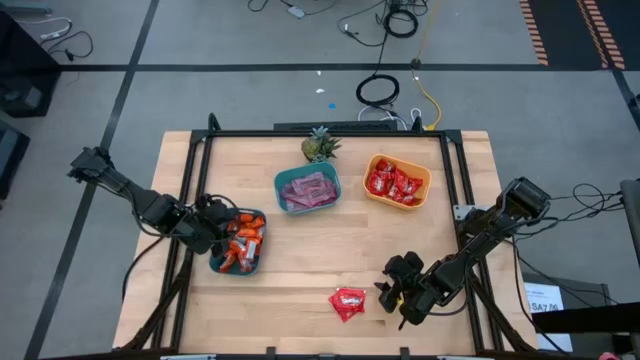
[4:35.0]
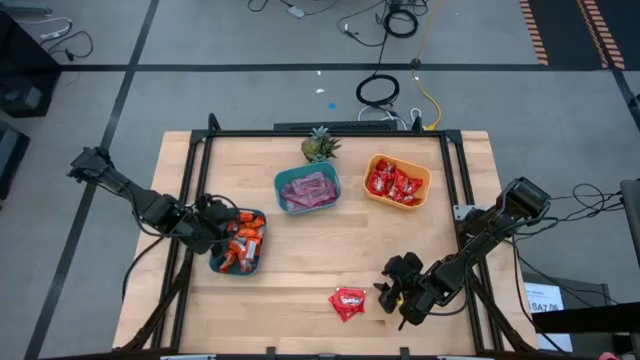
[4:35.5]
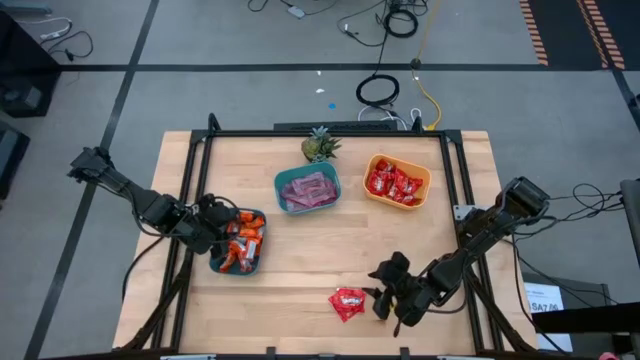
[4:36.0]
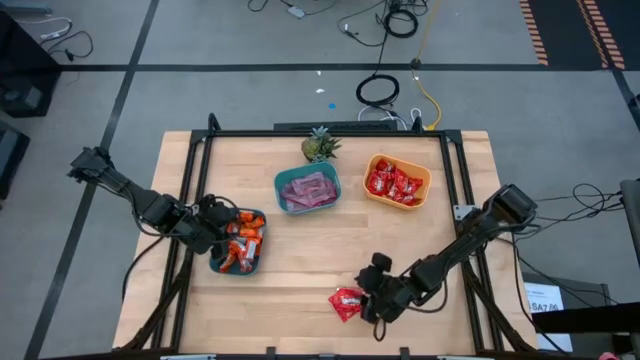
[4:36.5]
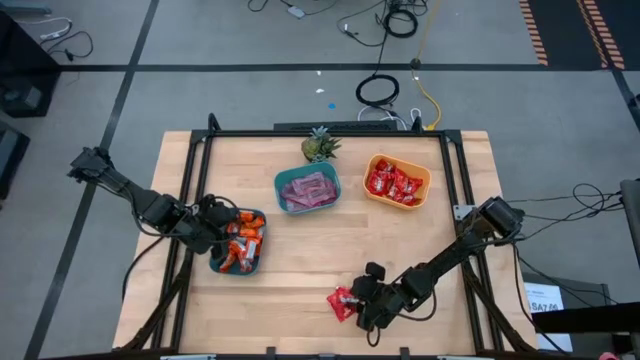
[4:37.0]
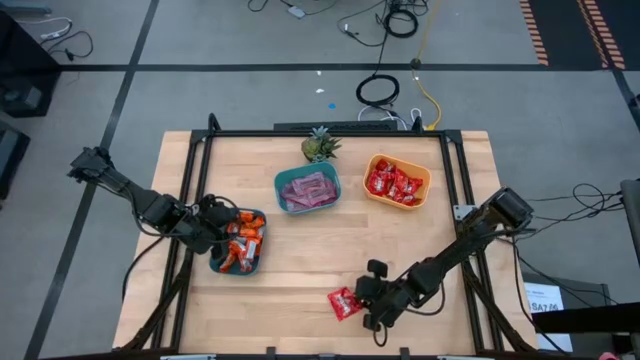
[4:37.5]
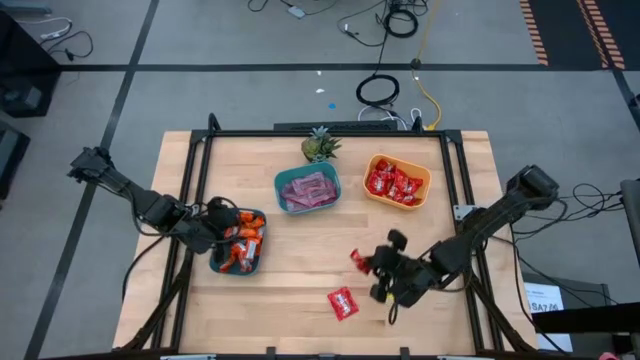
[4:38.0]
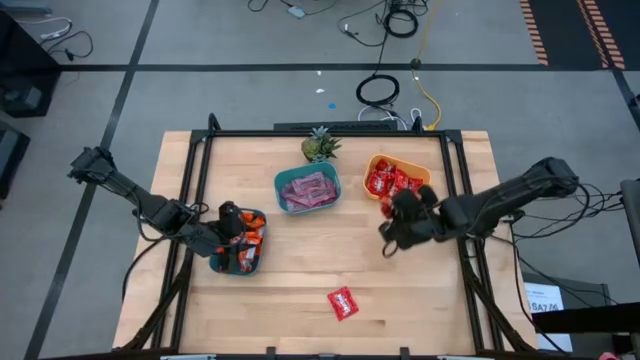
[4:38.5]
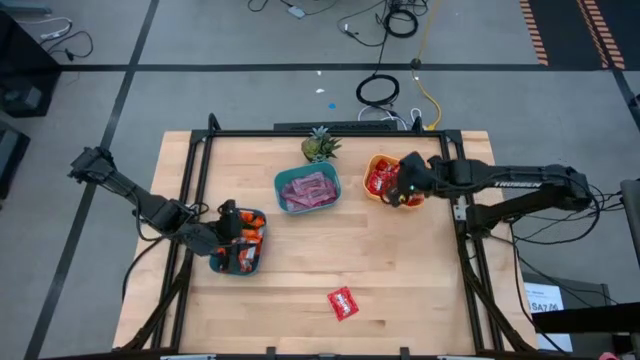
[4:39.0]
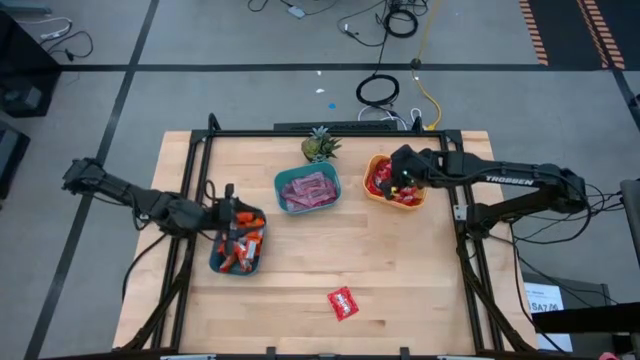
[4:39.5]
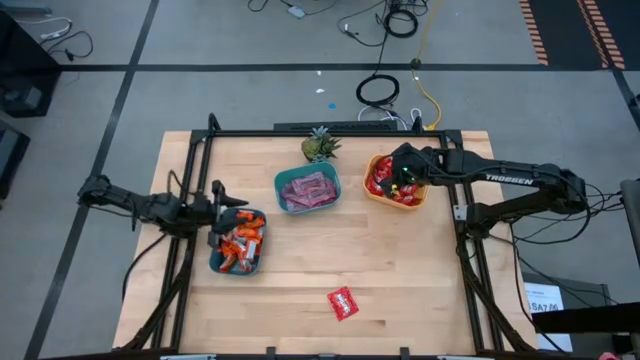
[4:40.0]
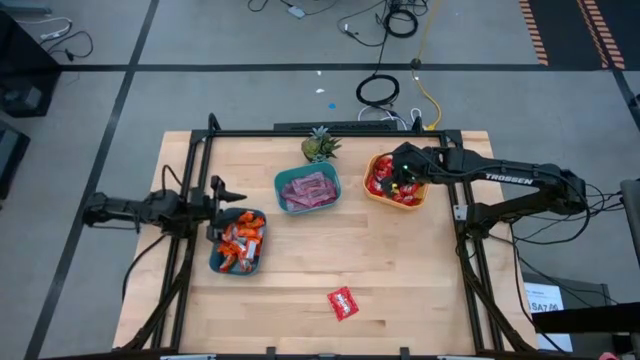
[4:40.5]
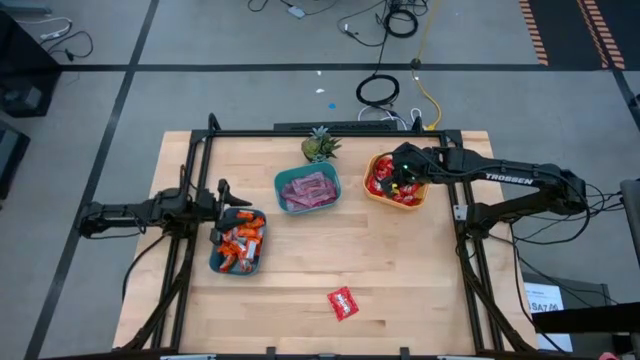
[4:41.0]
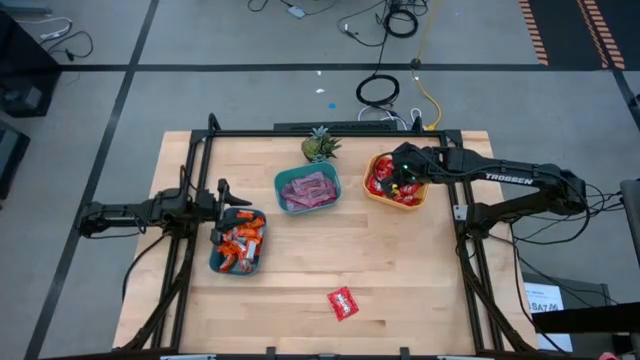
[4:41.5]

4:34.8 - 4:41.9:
Task: Sort candy
Put the red candy into the yellow bin

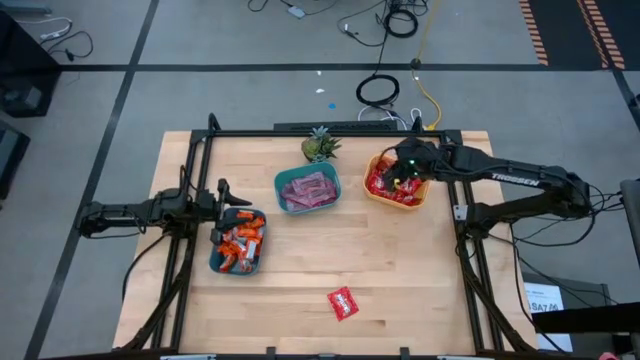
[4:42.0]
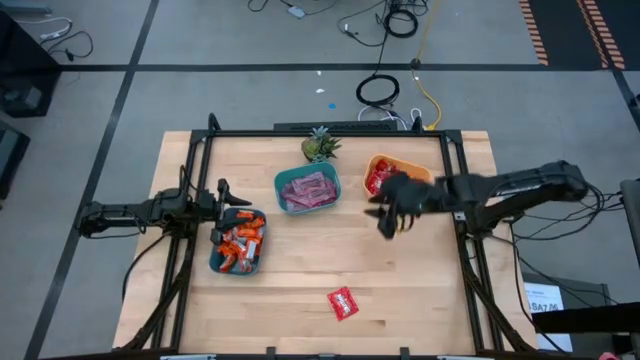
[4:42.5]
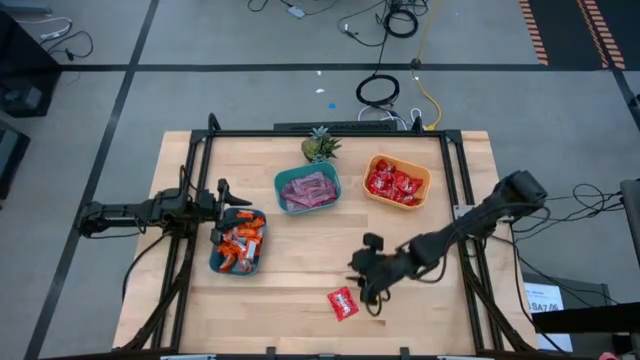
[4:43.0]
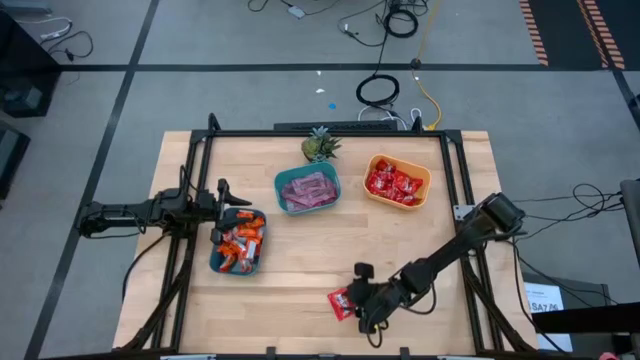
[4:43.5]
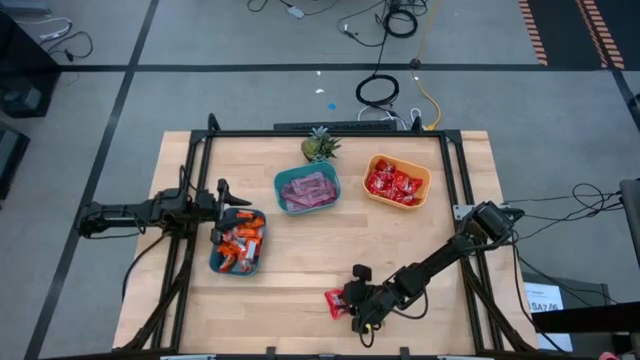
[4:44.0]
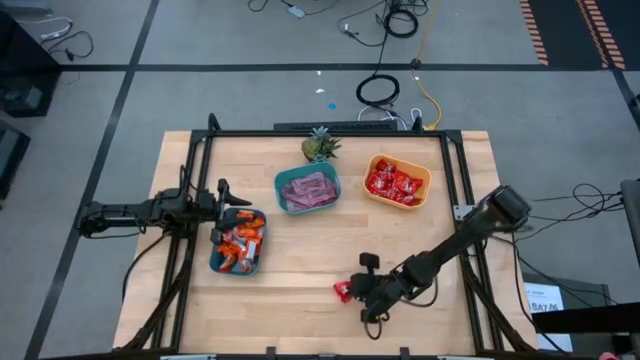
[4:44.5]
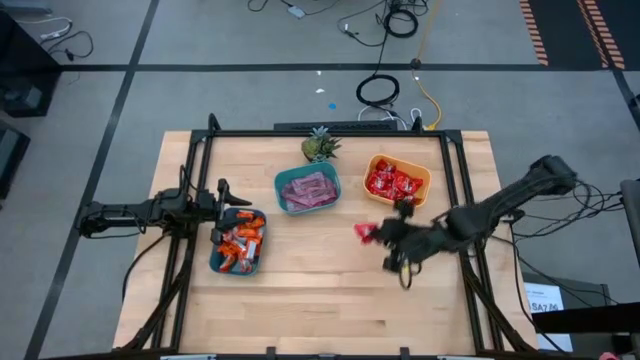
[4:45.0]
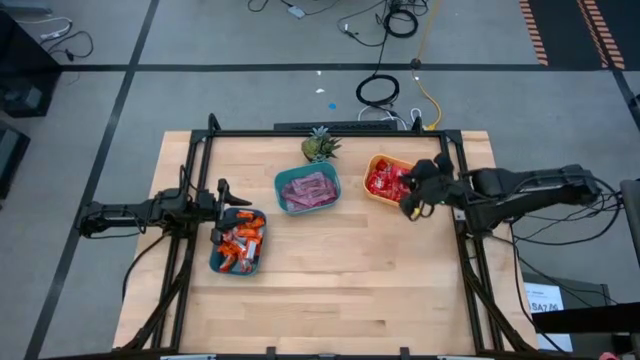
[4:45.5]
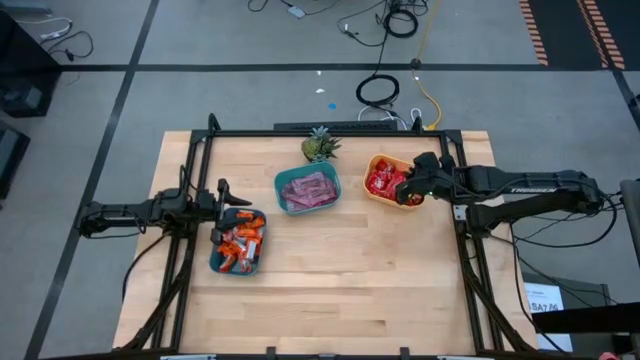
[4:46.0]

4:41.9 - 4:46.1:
Put the red candy into the yellow bin

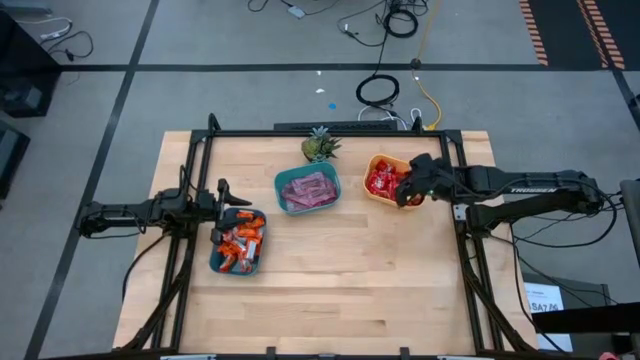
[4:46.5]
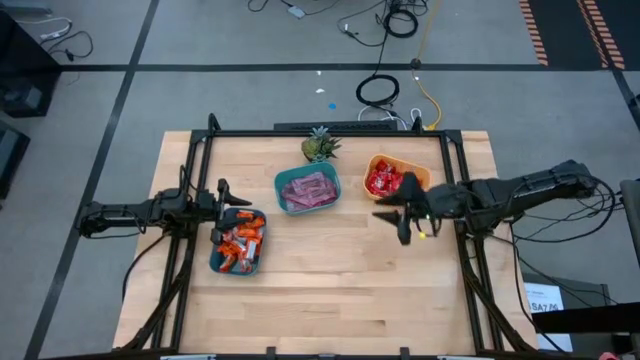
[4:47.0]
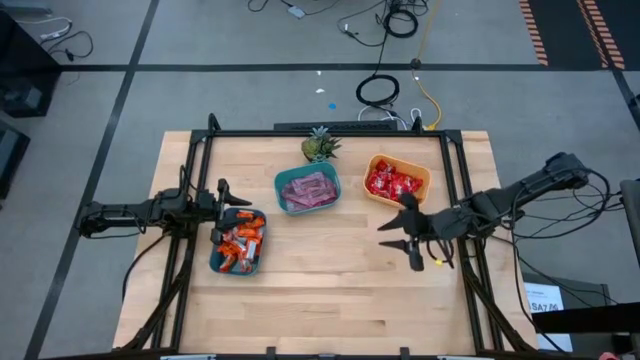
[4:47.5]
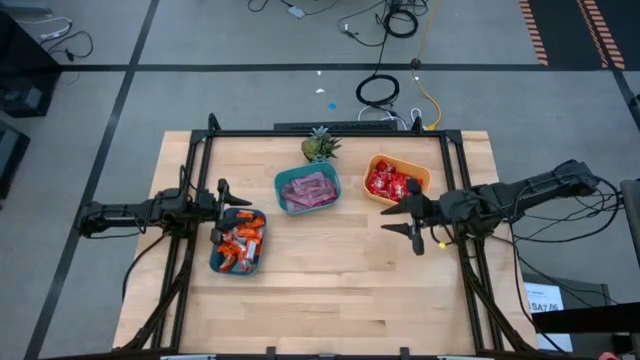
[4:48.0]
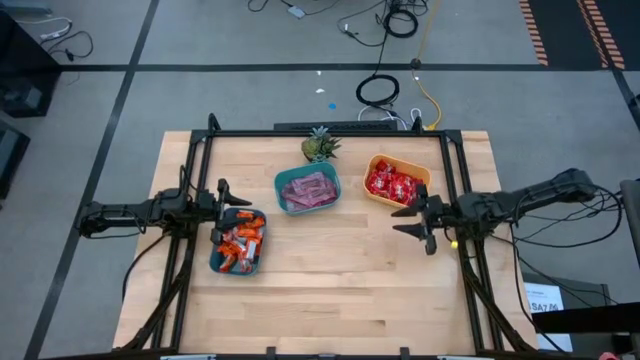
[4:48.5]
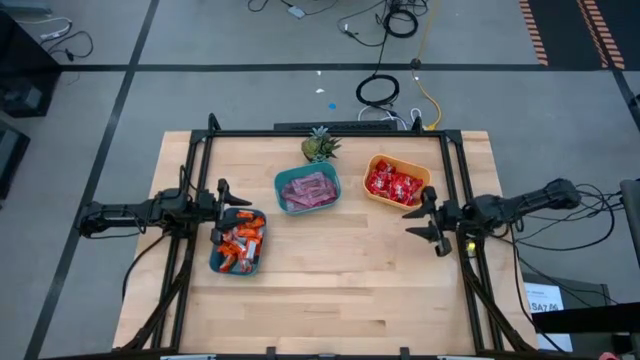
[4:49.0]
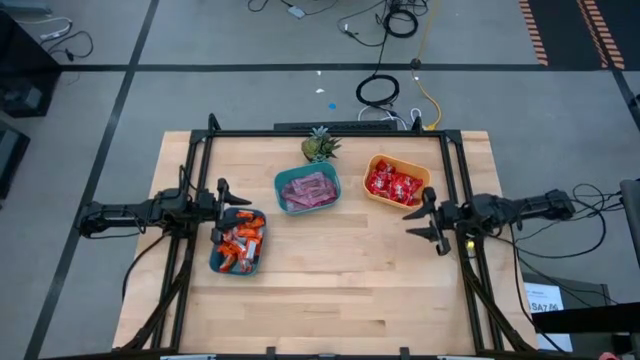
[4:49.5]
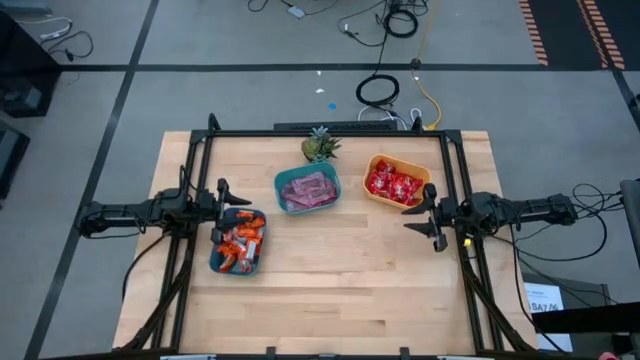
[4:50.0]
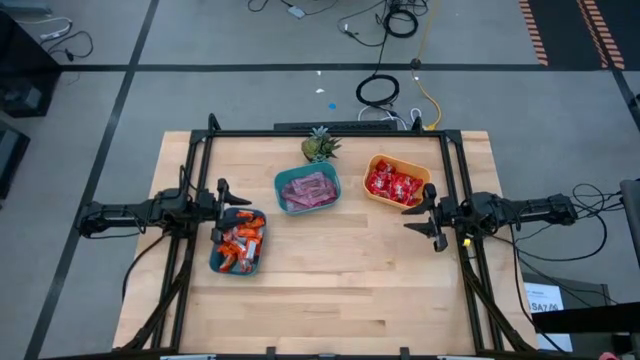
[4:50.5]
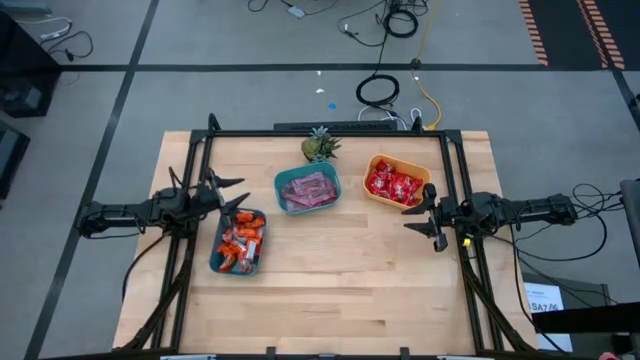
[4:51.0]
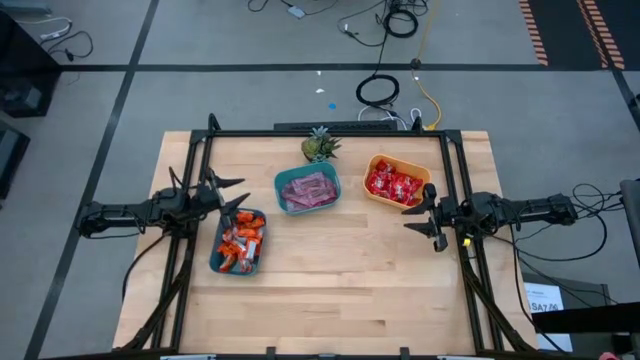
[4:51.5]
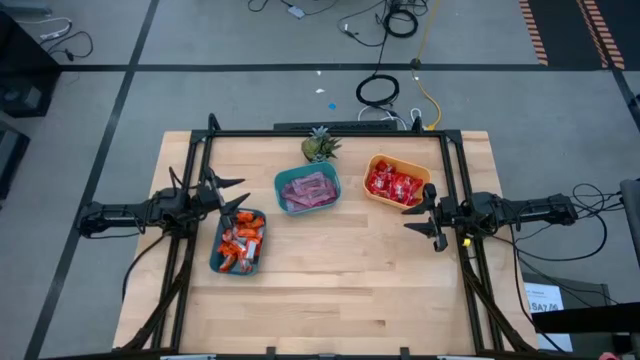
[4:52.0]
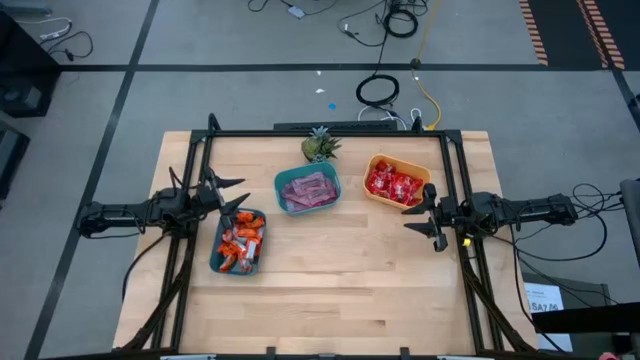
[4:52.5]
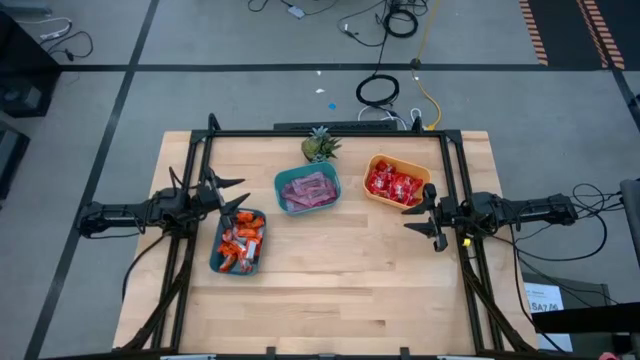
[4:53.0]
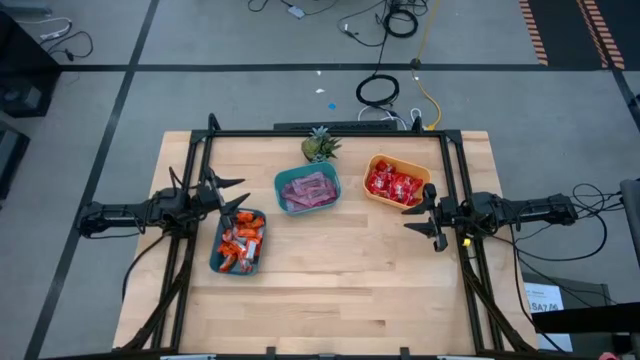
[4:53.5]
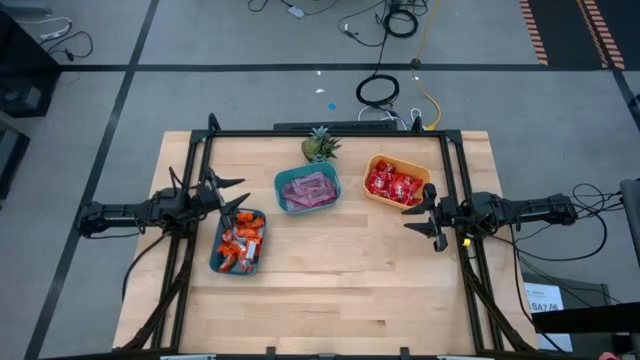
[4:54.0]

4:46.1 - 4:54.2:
Return to Home Position

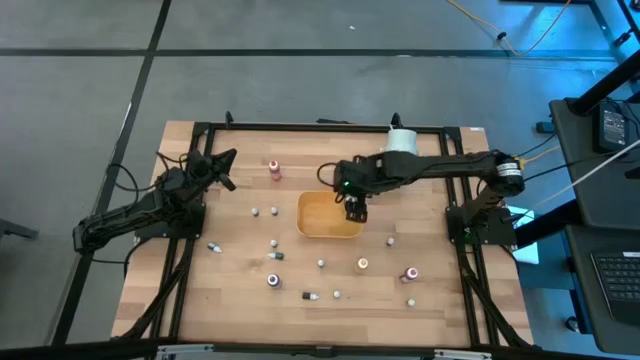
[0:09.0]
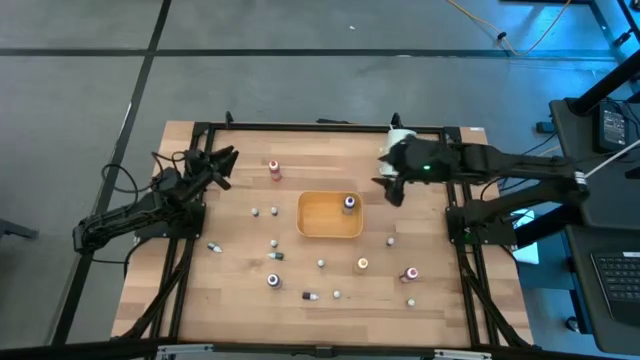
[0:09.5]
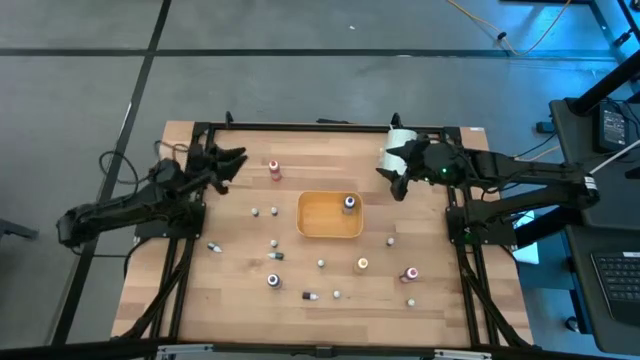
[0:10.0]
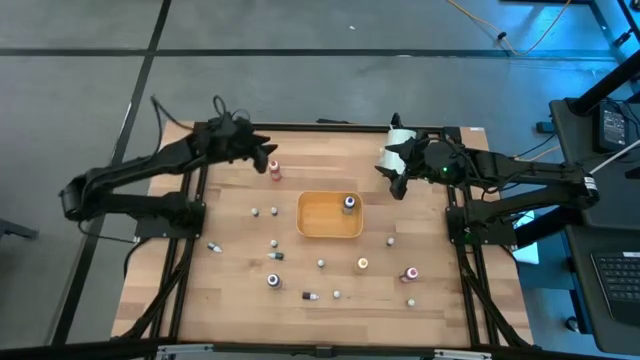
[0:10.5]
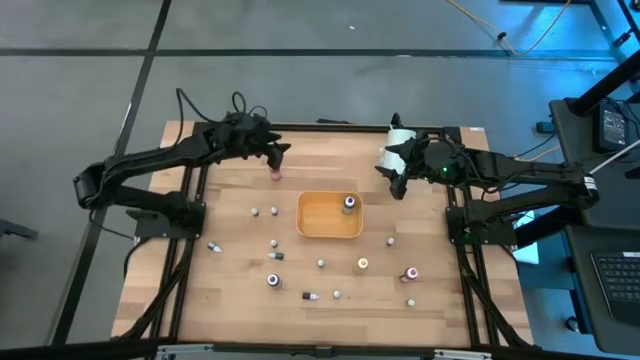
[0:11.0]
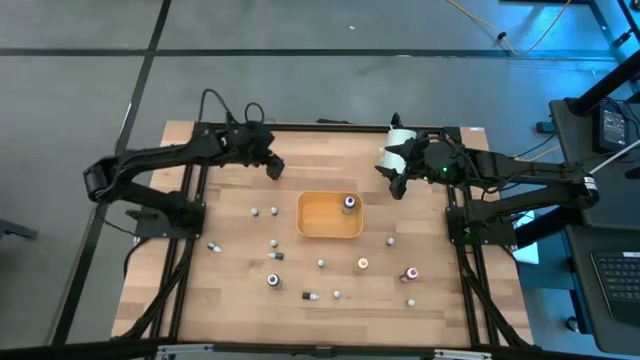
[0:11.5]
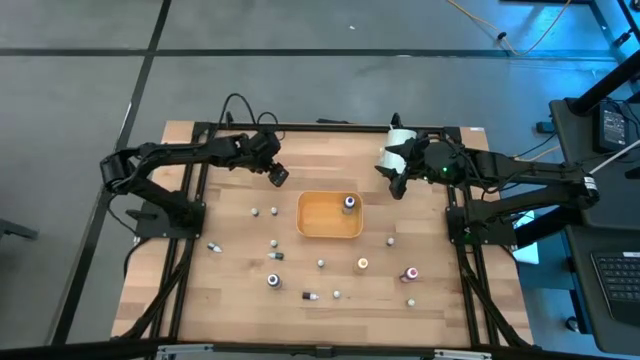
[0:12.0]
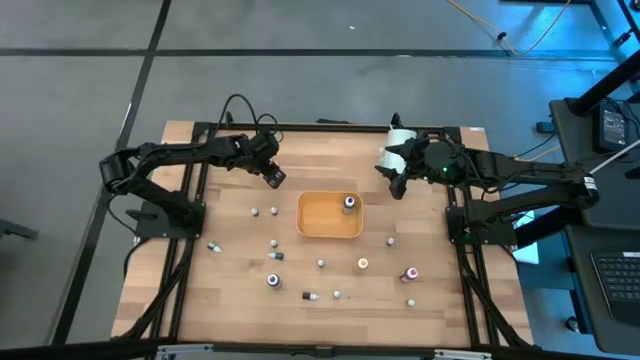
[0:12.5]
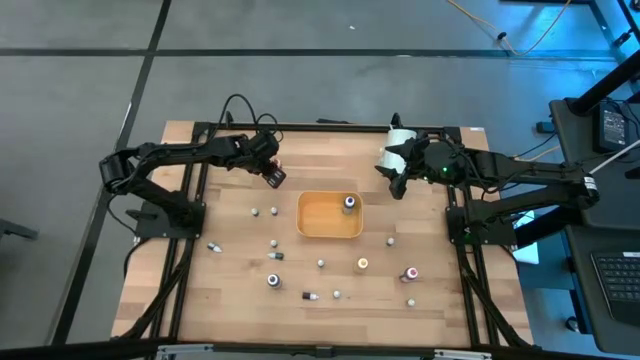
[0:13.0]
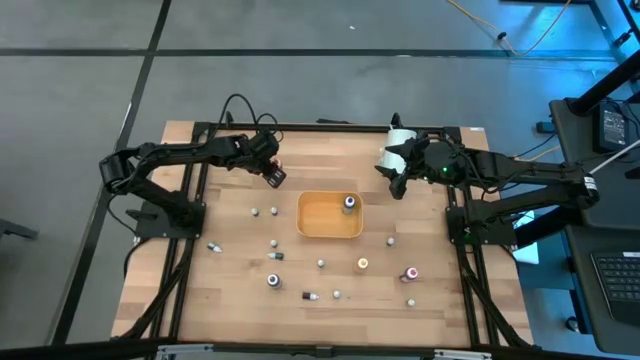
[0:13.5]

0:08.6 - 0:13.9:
Task: Pick & Place food coloring
Put the orange food coloring bottle into the yellow bin
